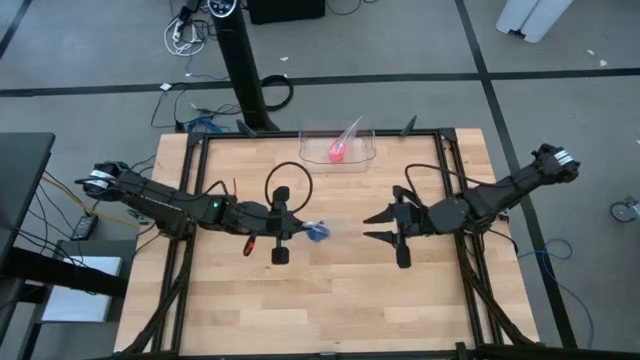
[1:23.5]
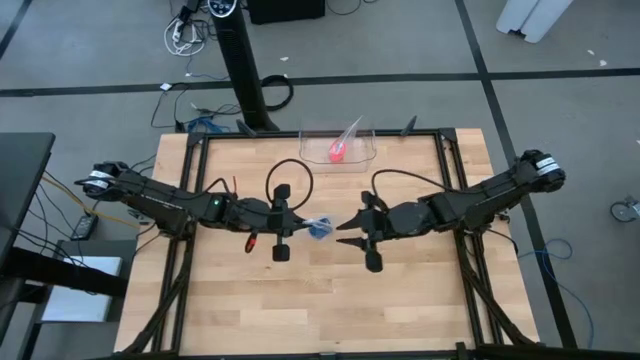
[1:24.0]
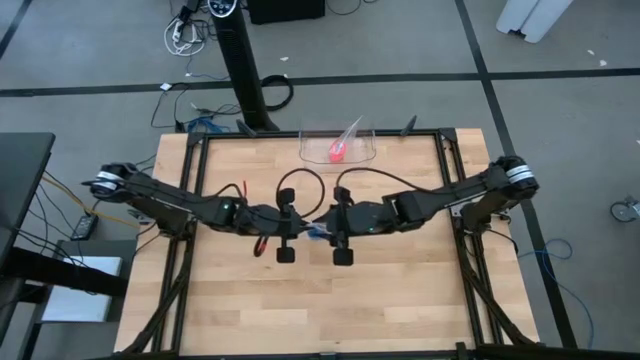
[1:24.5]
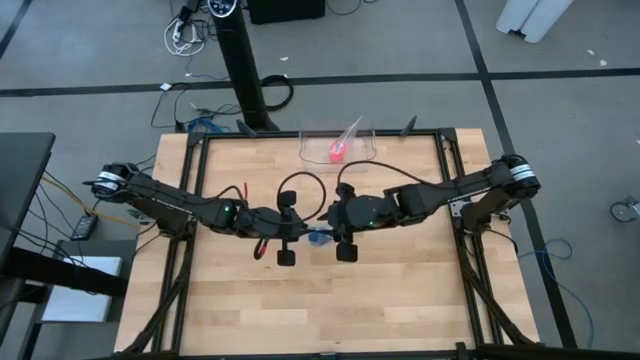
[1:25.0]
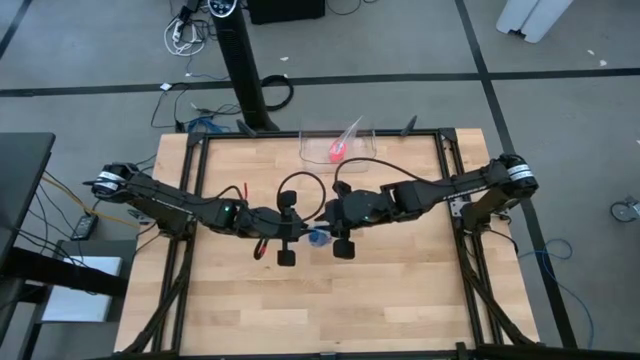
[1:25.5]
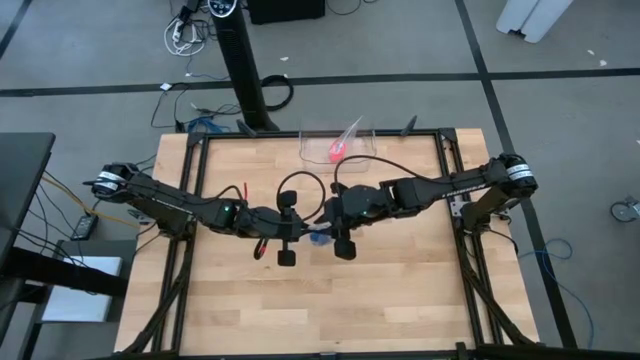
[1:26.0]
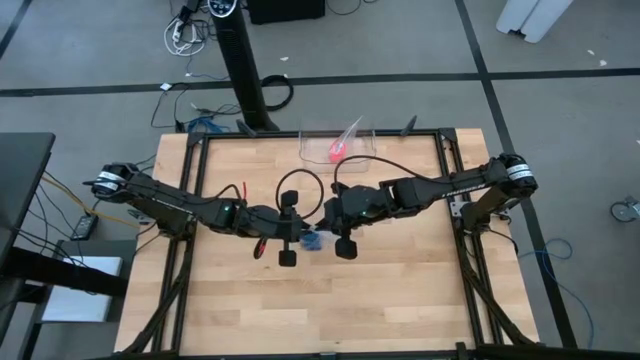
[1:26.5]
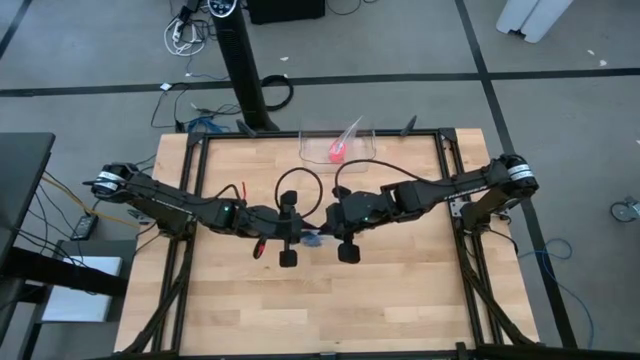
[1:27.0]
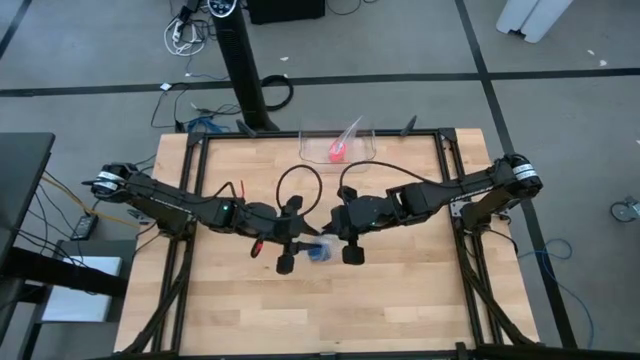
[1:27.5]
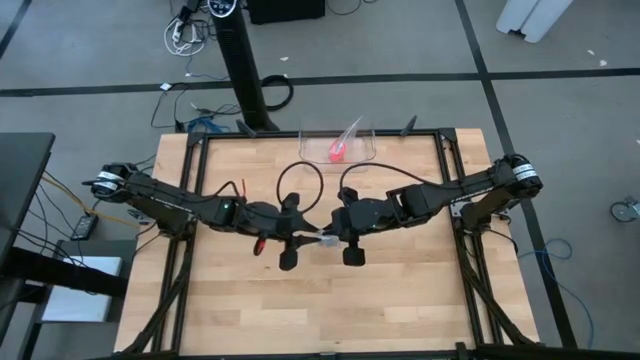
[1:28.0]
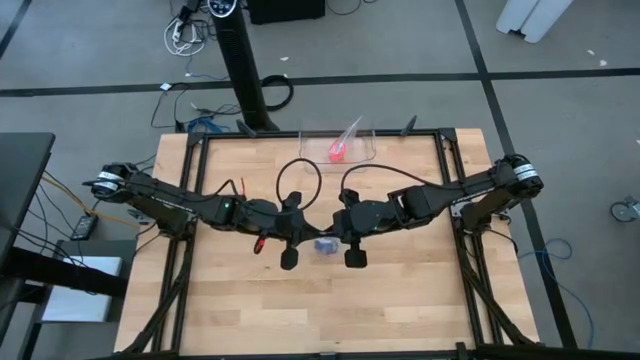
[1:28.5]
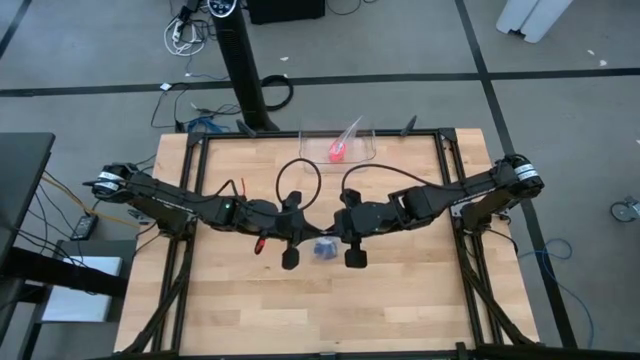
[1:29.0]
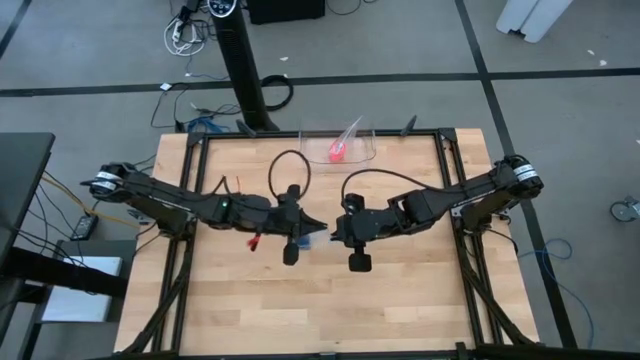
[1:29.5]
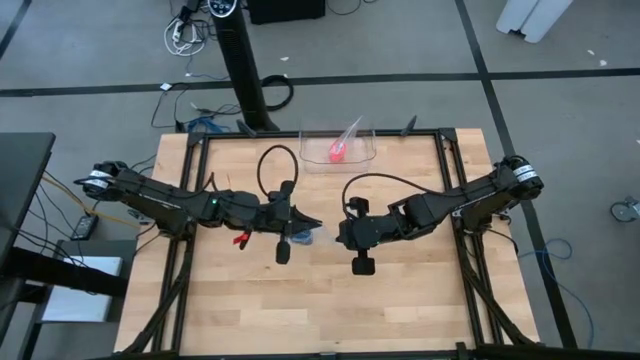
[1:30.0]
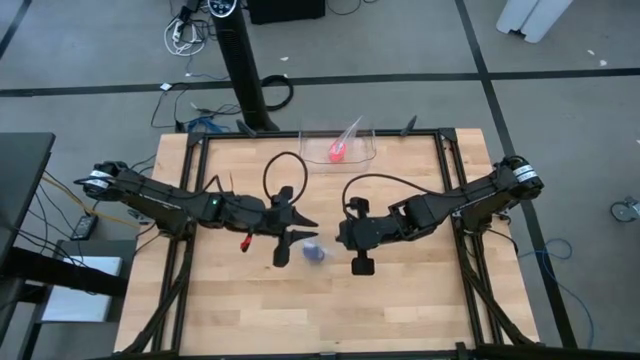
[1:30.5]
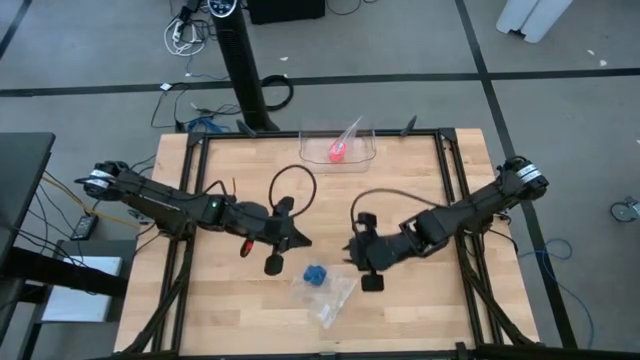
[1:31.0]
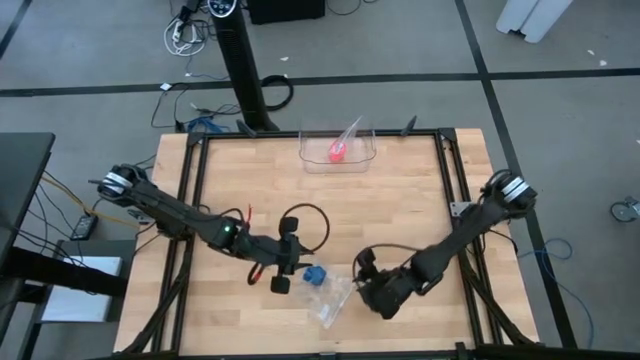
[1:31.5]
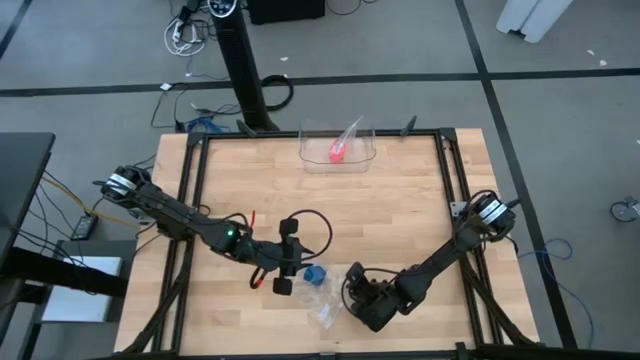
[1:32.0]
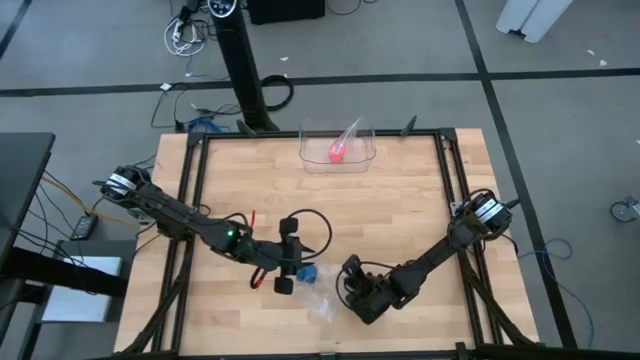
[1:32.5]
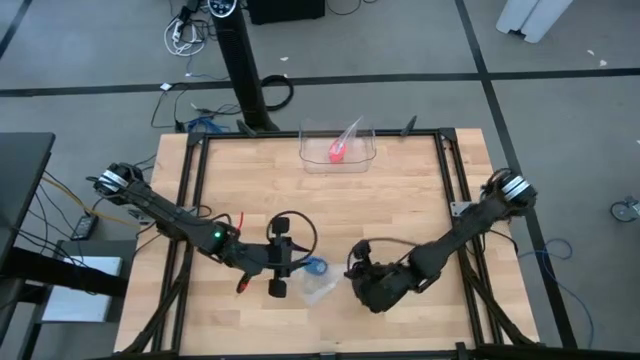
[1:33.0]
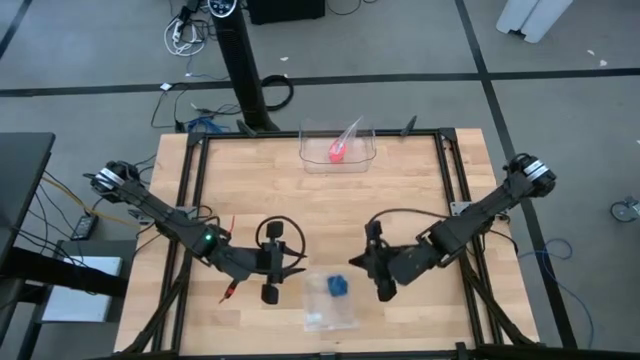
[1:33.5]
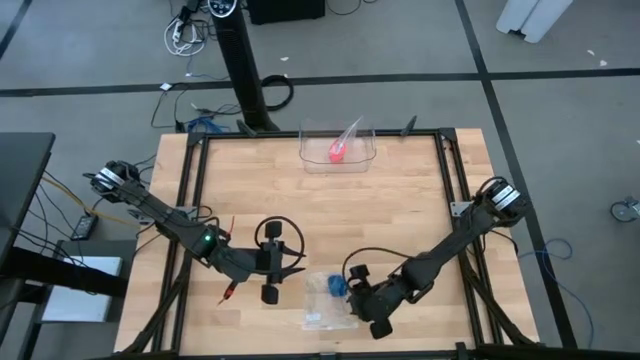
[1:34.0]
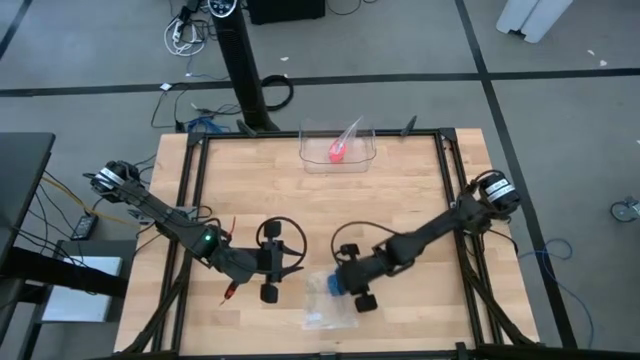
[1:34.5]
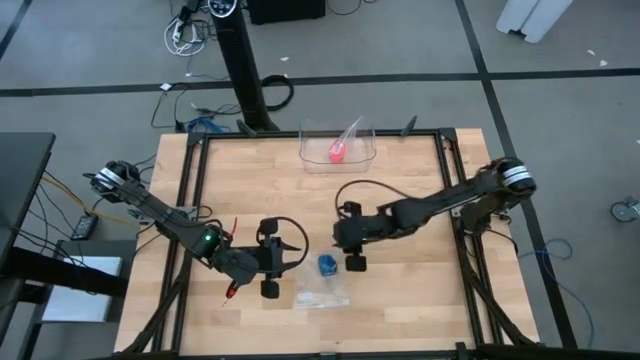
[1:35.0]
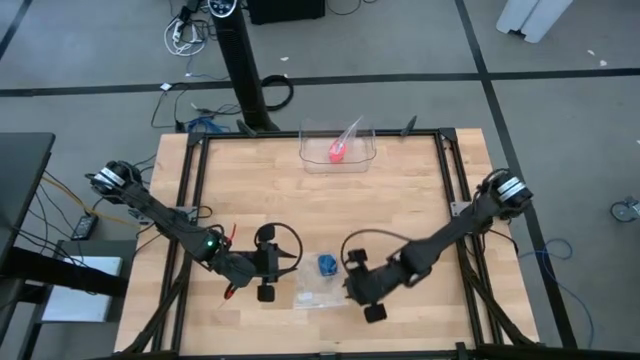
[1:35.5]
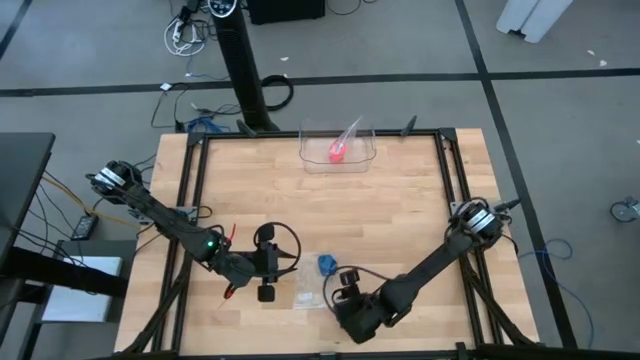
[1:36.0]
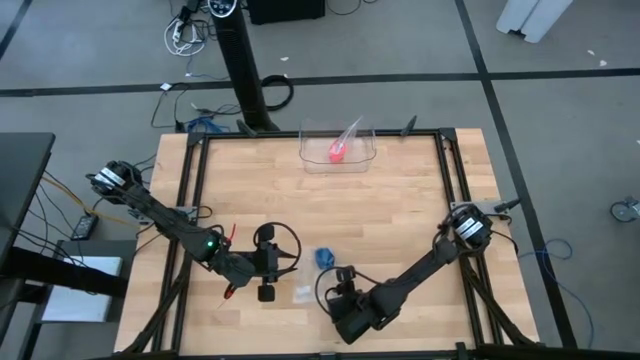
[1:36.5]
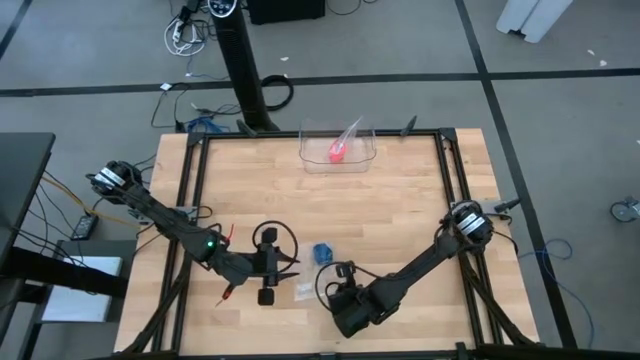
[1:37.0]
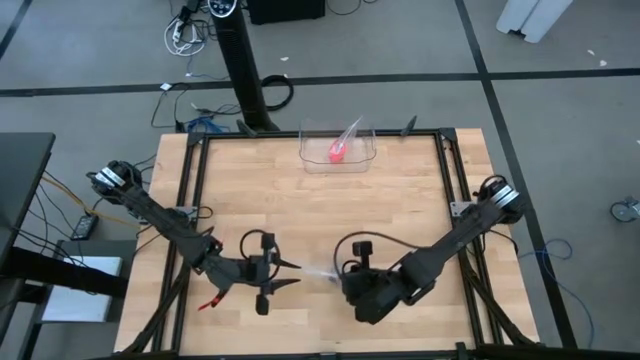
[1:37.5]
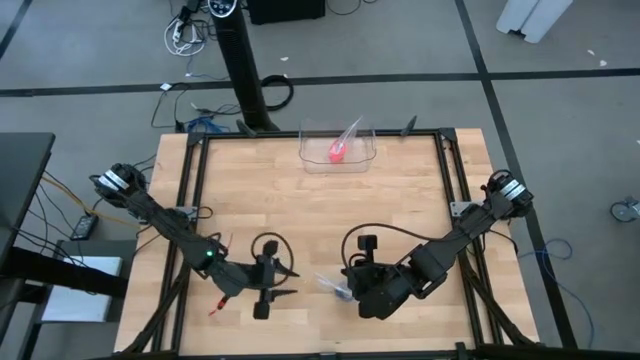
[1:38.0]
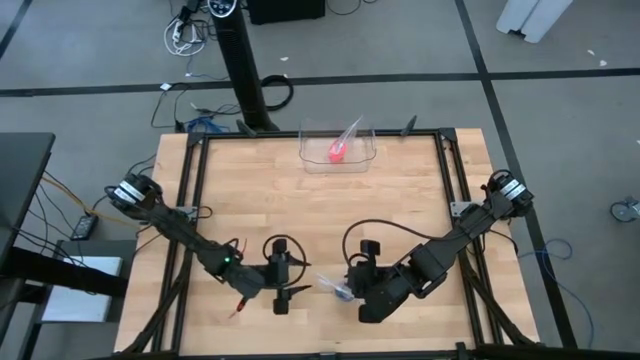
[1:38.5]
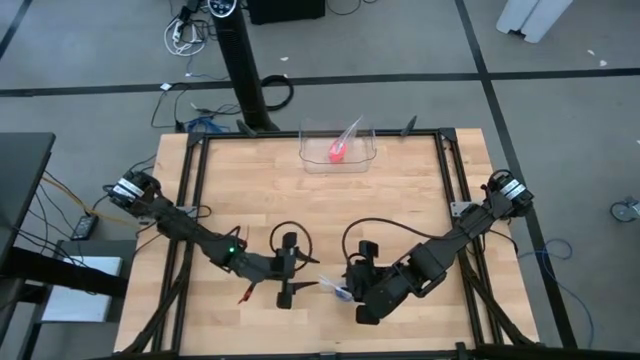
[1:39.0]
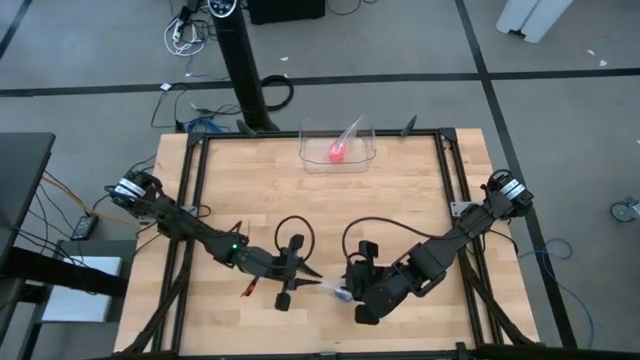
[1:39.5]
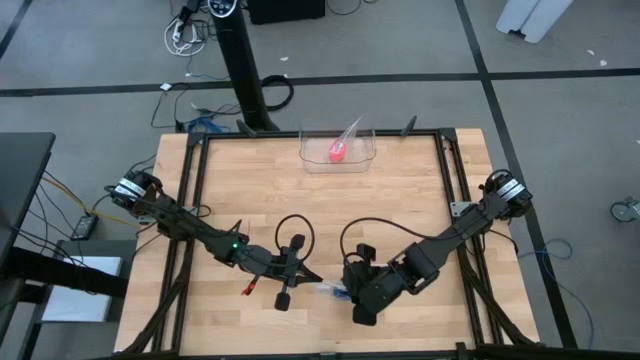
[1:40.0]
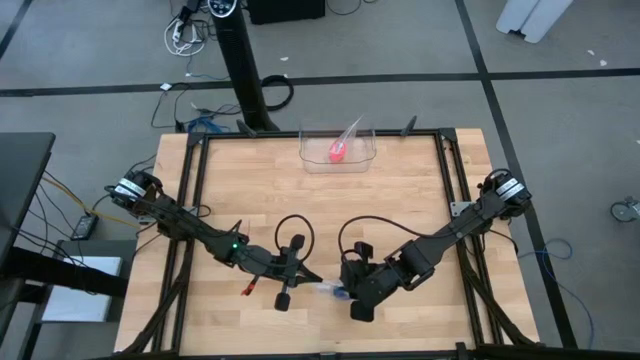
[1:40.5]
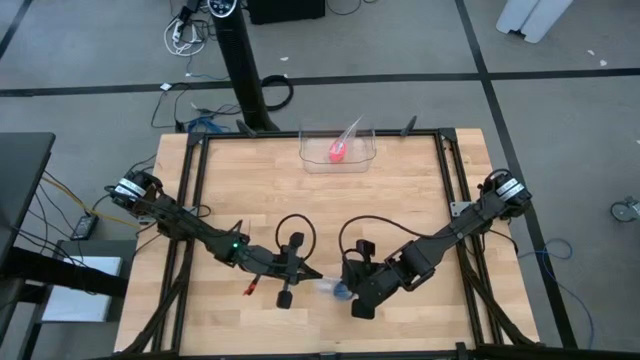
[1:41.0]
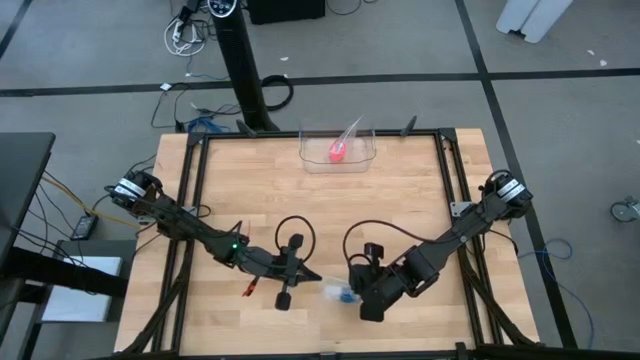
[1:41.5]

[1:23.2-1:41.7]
Task: Roll bandage
Close the transparent zip bag

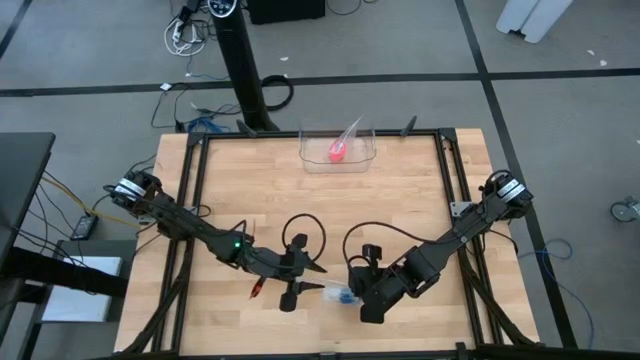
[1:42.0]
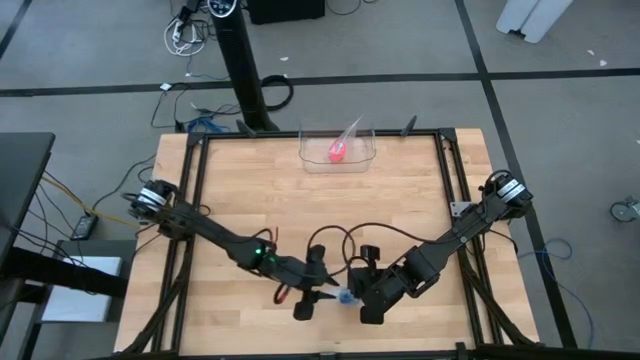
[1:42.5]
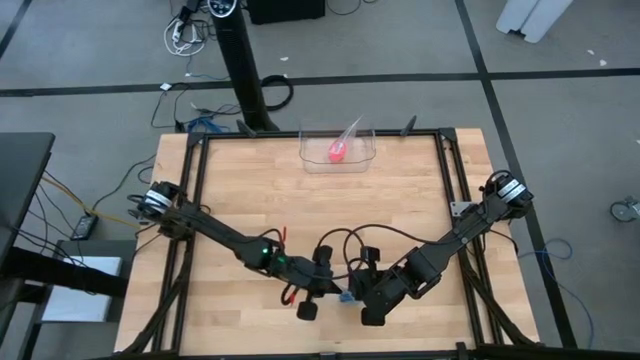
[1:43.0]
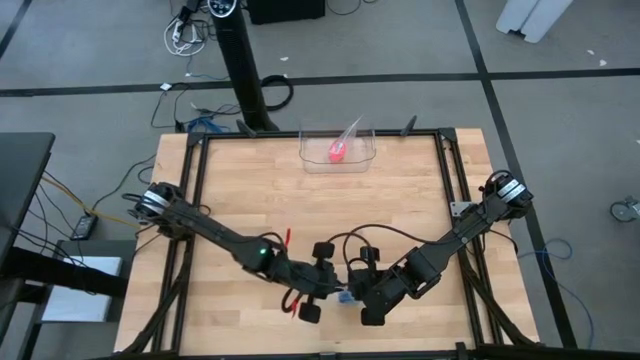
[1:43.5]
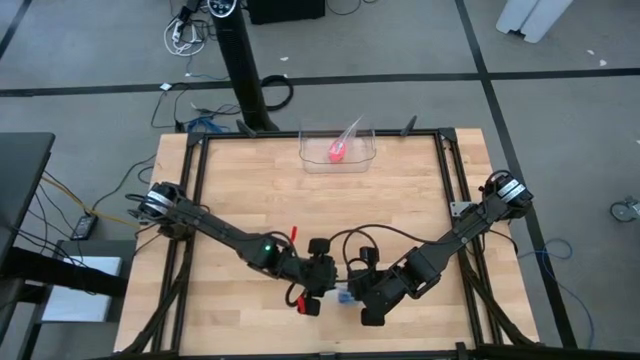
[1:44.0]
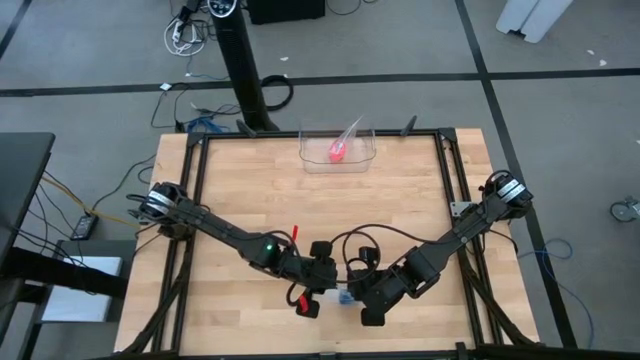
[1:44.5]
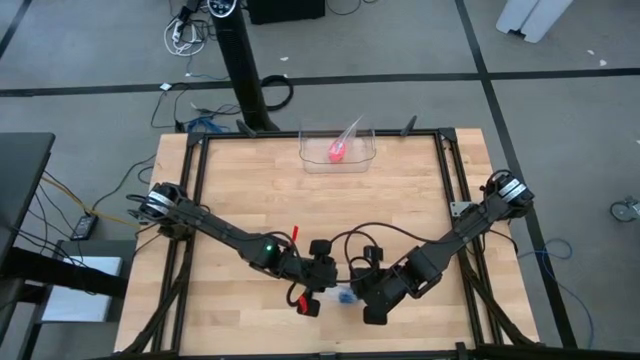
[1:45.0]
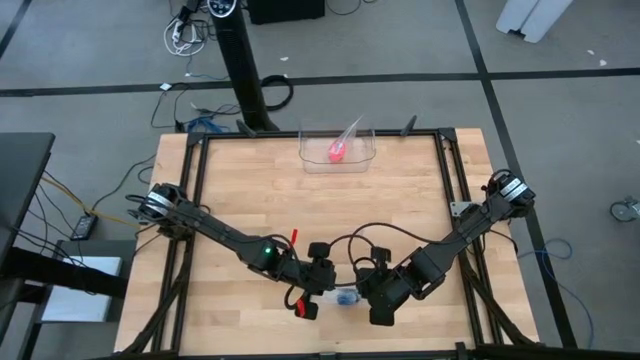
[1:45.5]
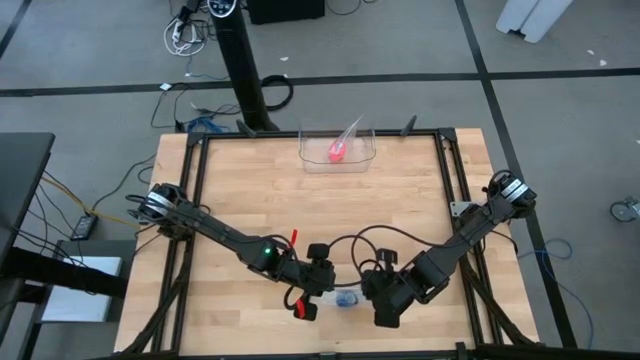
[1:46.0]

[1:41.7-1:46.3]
Close the transparent zip bag
